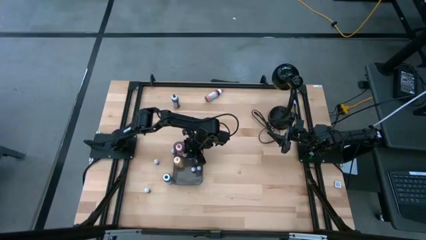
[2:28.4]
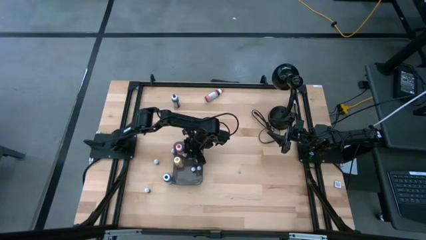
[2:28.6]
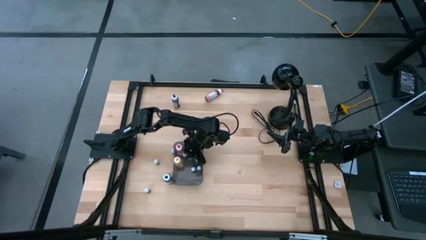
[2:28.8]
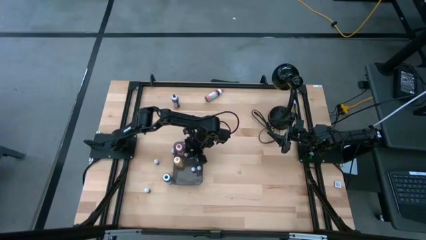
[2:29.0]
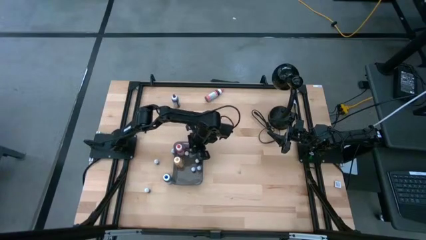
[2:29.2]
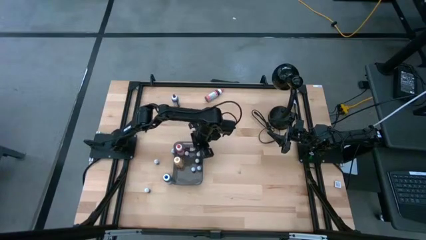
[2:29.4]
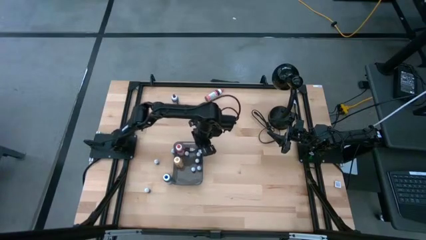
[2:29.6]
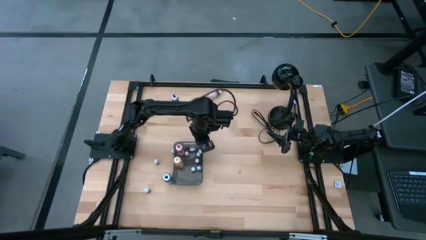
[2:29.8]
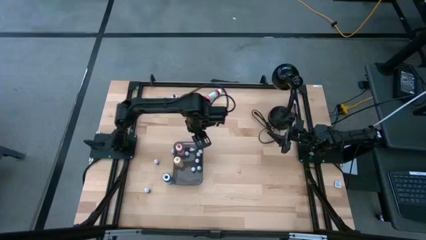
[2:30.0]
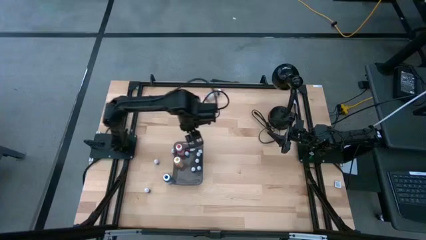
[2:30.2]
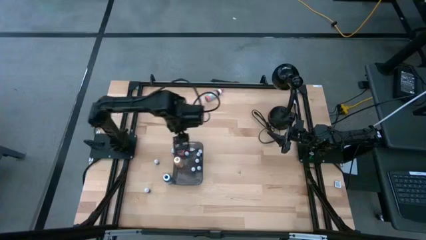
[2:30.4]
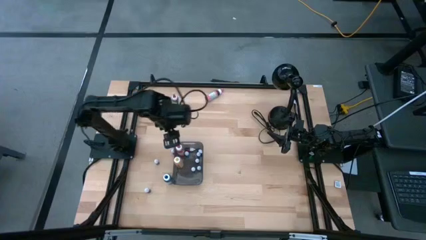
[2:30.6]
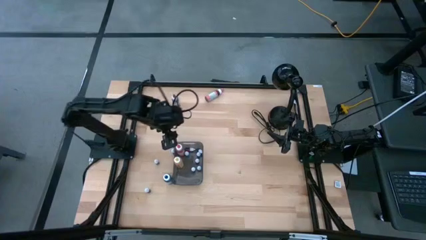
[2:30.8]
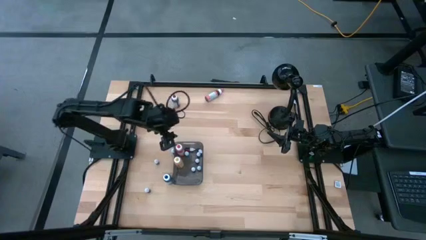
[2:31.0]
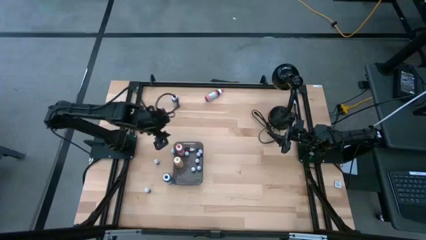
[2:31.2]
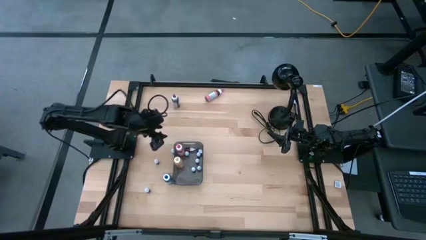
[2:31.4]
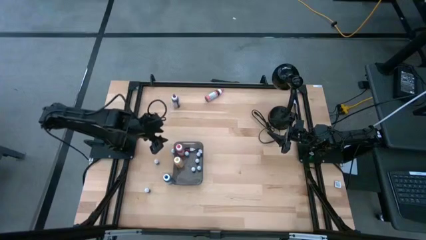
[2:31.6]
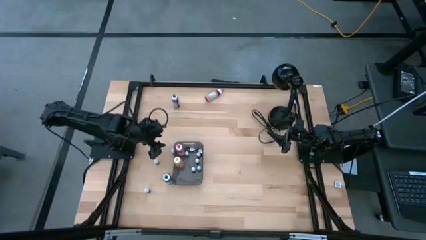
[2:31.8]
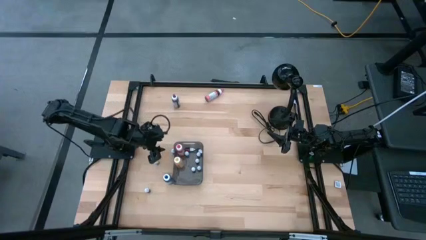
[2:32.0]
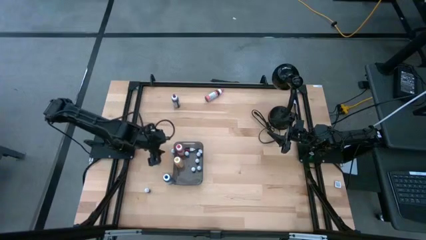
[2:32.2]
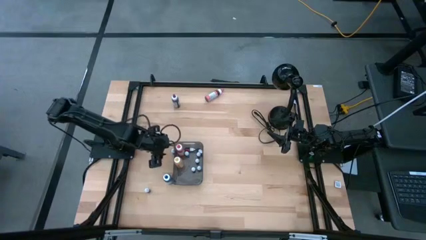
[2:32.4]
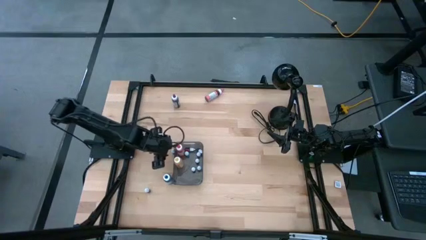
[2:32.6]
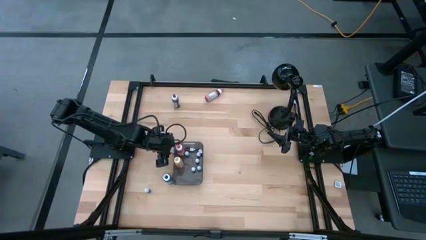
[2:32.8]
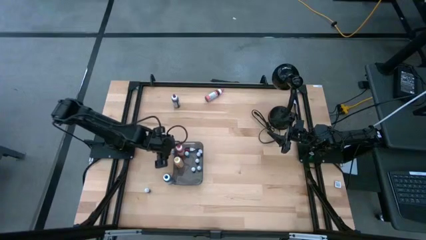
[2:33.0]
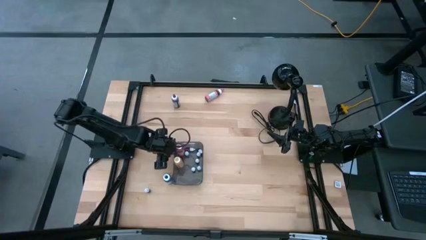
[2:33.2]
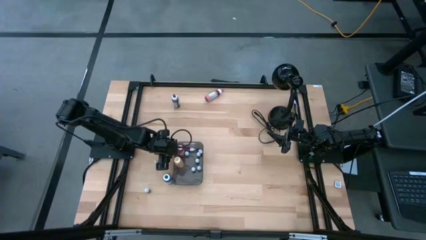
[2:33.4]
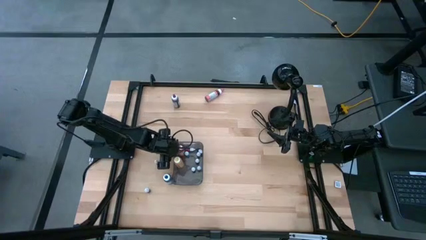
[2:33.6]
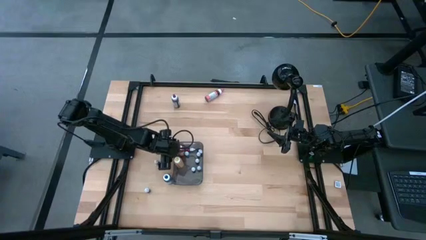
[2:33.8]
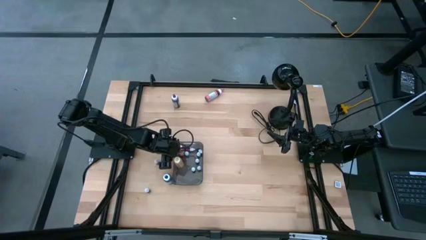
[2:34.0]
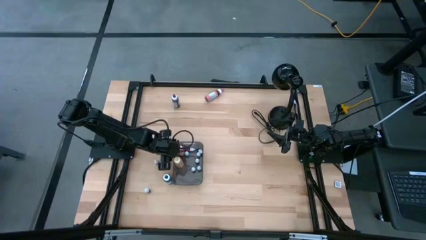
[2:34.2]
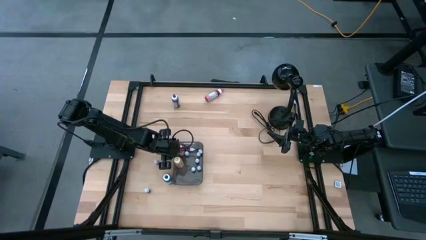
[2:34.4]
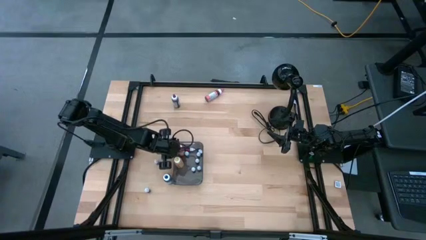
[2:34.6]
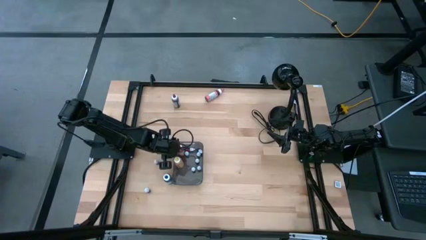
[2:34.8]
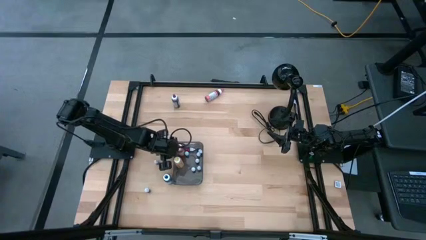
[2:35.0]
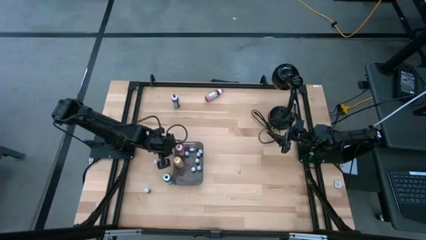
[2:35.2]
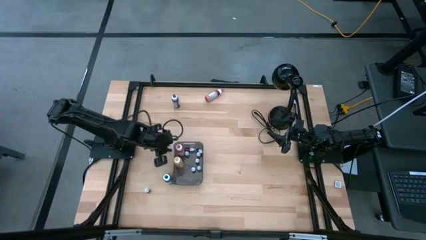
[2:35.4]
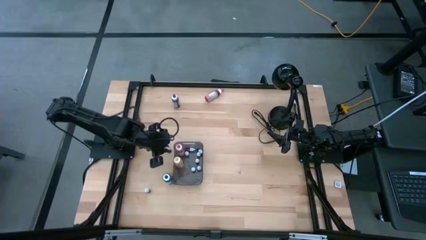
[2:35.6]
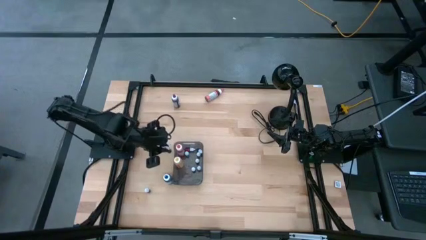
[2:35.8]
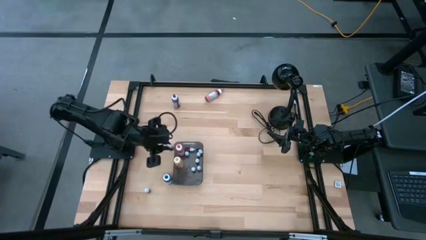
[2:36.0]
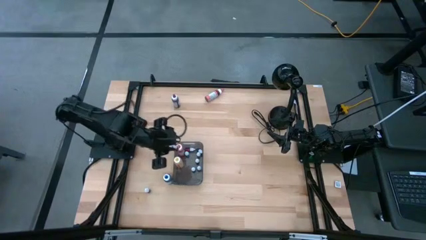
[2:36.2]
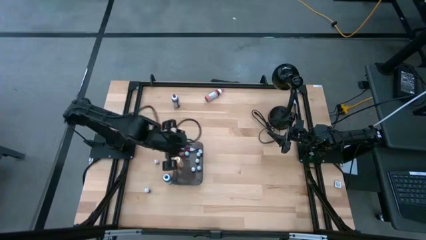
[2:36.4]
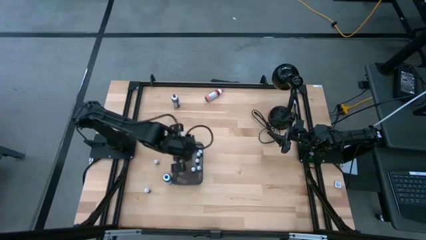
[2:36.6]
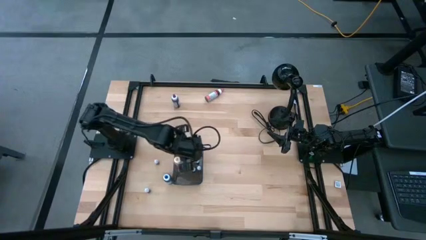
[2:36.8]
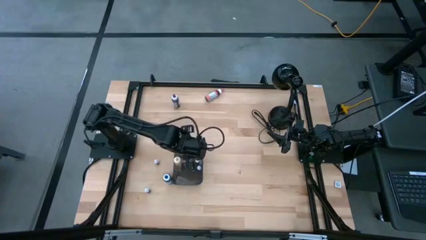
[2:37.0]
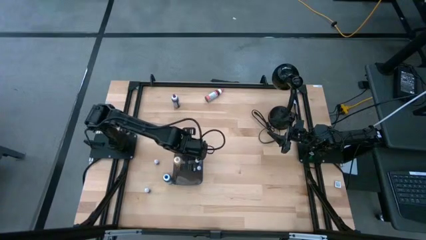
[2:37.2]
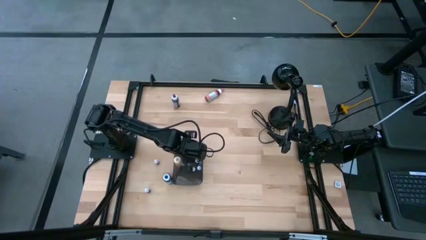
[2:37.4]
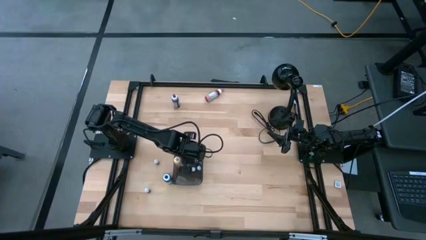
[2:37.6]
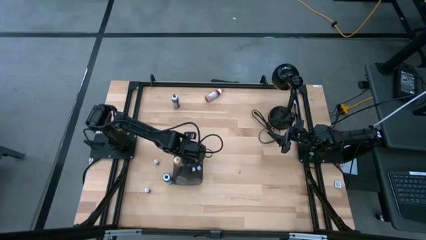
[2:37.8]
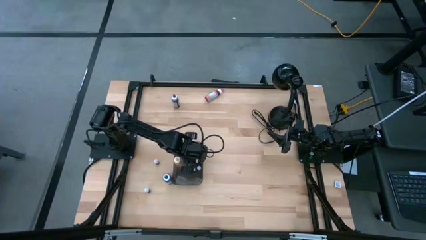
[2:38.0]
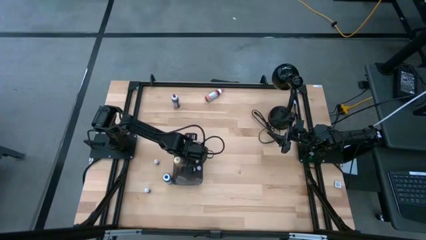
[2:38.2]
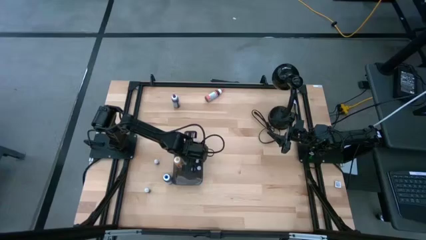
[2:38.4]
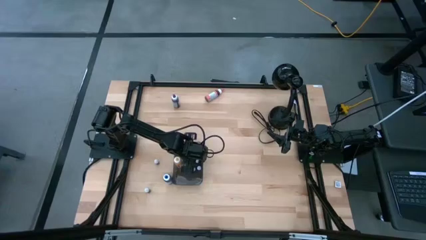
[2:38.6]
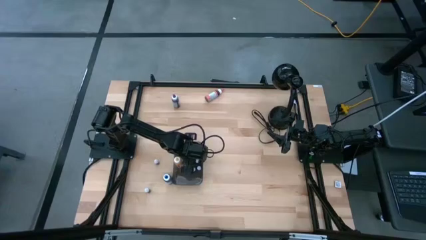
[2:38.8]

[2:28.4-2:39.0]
Task: Pick & Place food coloring
Put the blue food coloring bottle into the bin

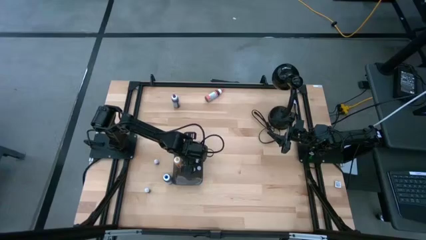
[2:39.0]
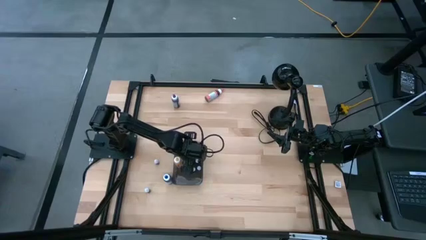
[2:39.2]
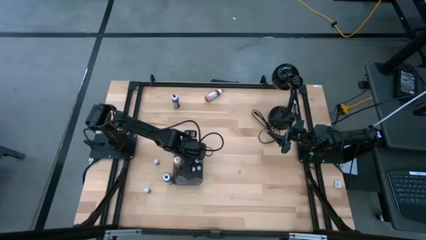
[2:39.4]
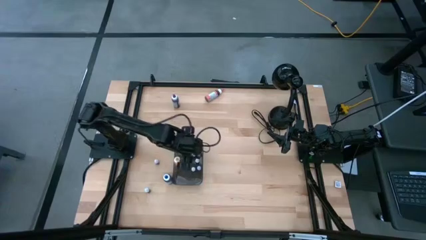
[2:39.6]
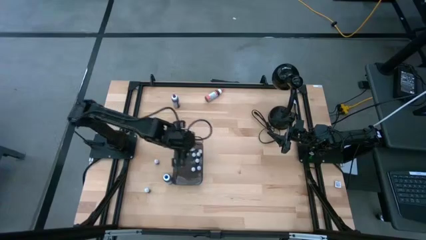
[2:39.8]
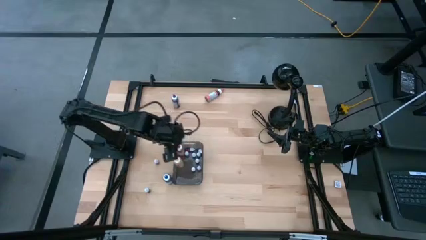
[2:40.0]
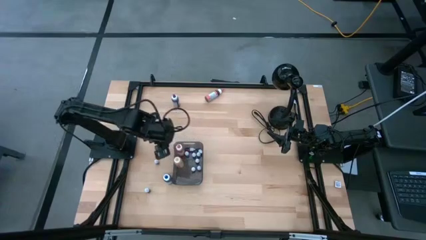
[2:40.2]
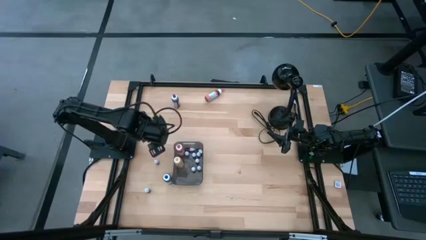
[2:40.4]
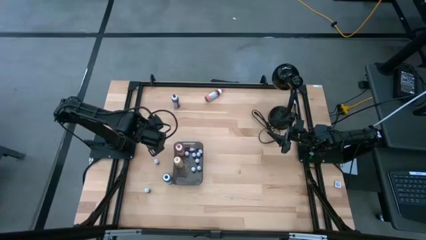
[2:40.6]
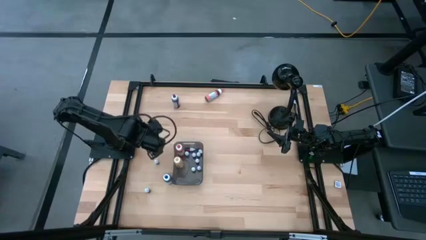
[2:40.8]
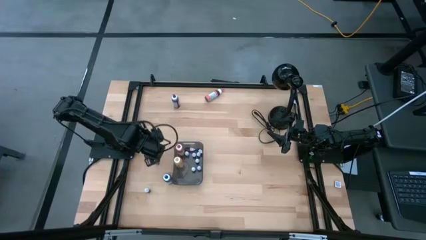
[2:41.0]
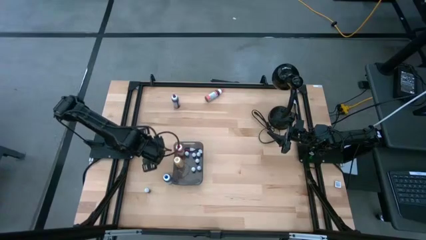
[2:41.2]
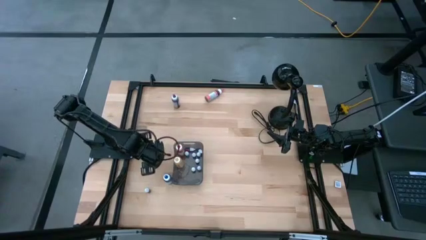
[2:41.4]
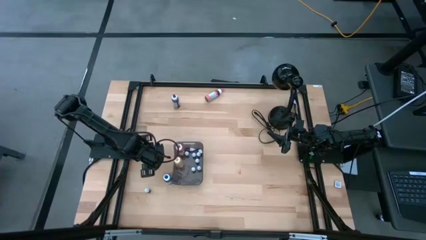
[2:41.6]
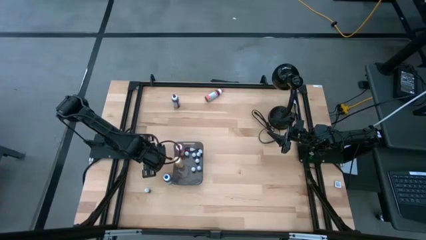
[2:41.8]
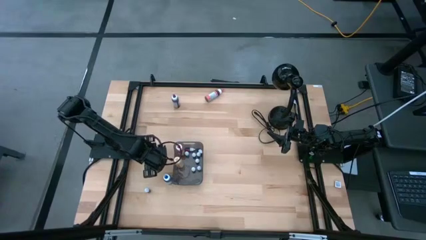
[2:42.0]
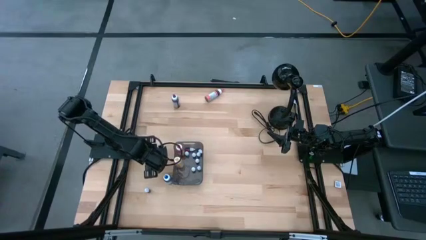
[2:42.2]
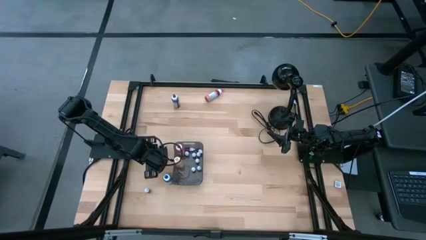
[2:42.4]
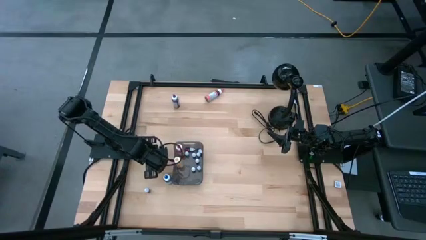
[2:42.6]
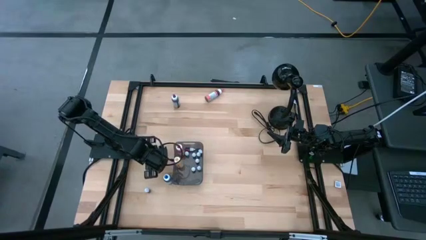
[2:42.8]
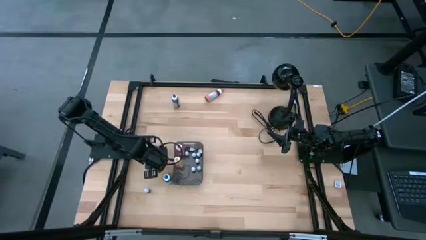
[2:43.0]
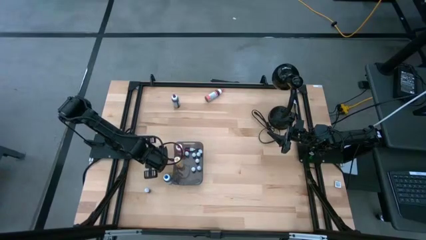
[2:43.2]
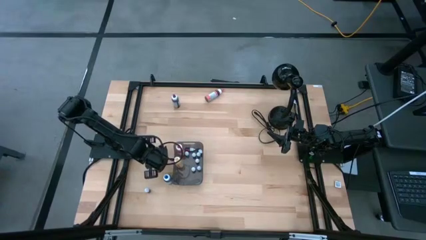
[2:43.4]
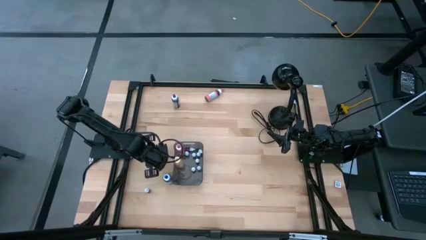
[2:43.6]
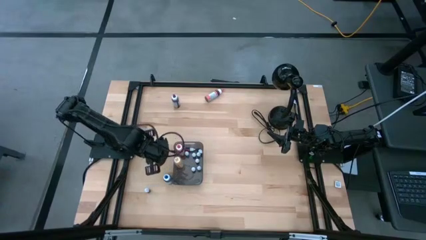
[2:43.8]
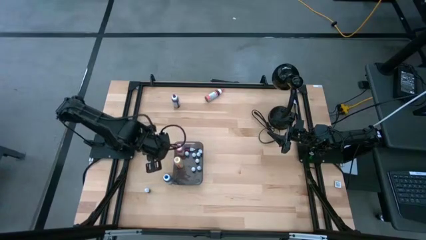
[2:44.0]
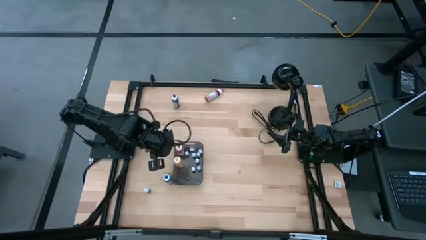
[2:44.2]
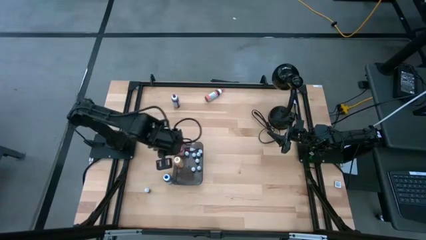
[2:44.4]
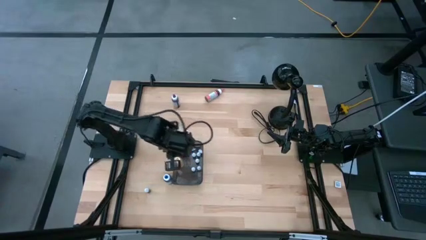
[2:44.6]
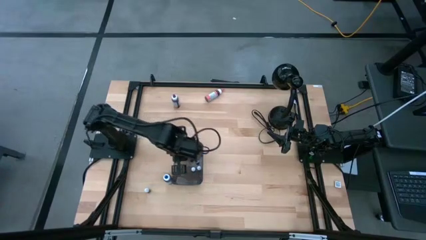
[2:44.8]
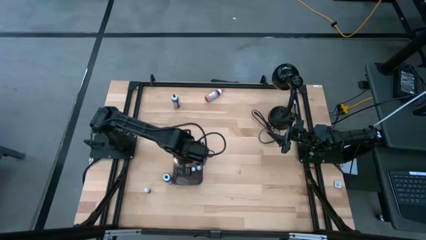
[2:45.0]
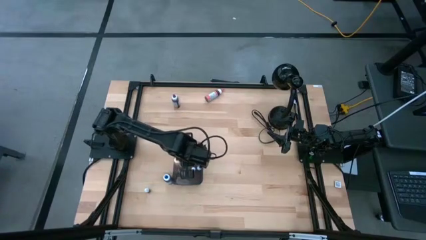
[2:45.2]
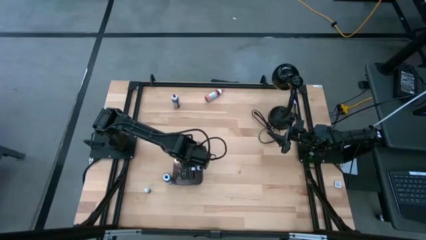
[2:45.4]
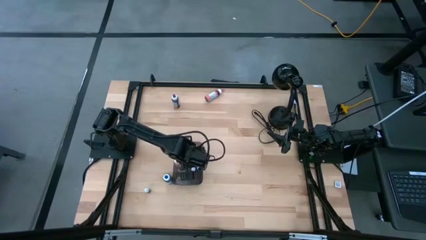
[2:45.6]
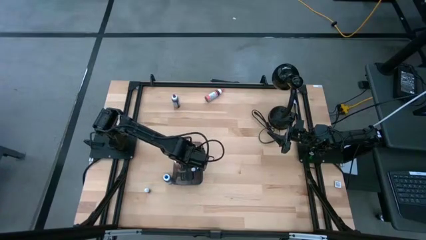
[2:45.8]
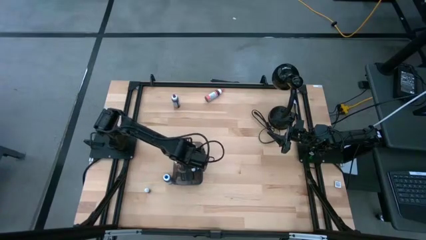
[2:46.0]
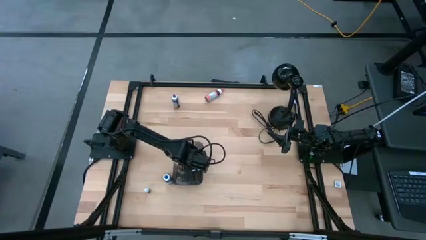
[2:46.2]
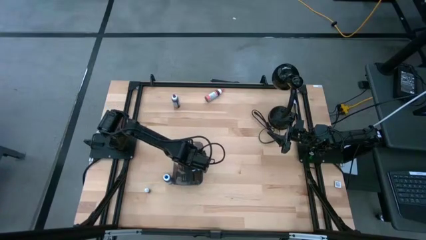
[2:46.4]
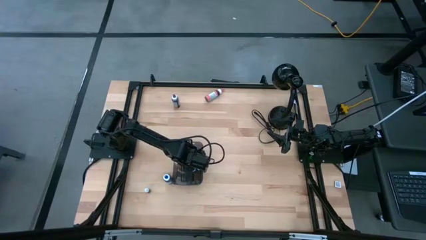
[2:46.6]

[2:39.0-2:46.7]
Put the bottom purple food coloring bottle into the bin
